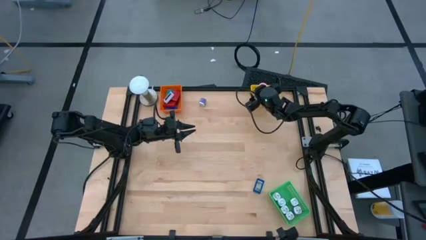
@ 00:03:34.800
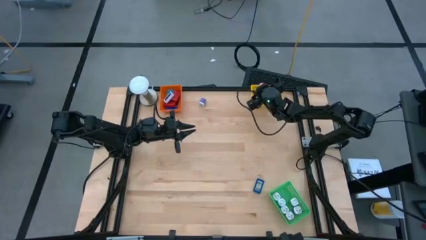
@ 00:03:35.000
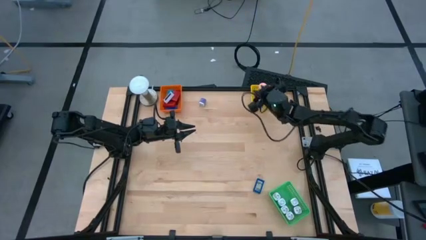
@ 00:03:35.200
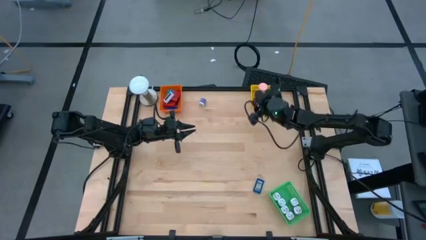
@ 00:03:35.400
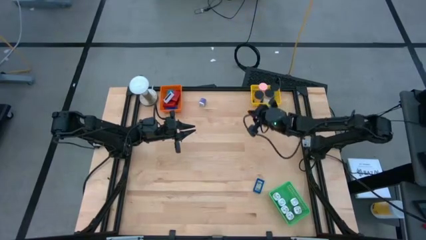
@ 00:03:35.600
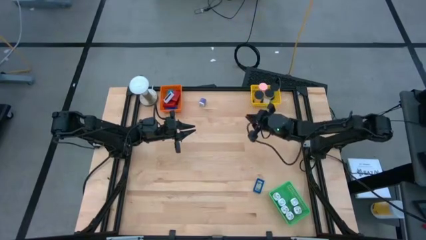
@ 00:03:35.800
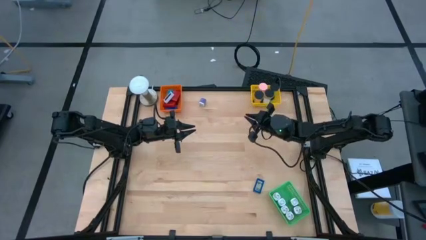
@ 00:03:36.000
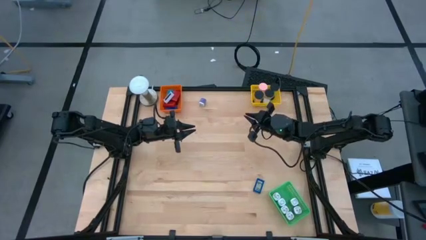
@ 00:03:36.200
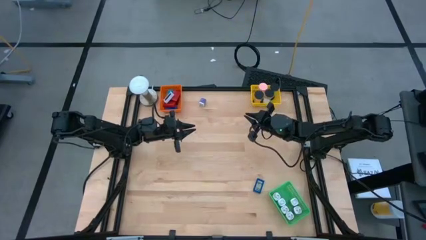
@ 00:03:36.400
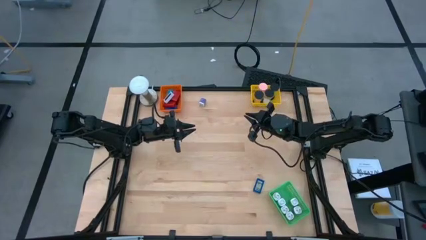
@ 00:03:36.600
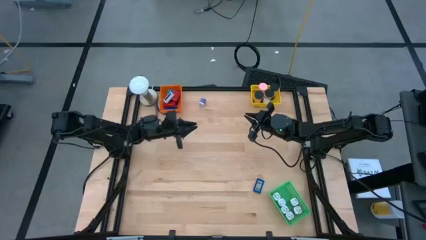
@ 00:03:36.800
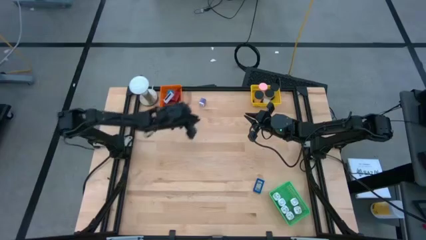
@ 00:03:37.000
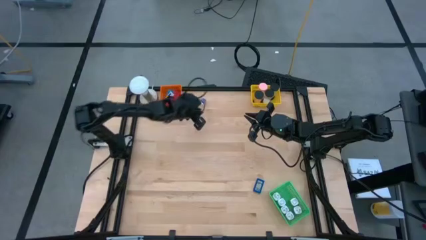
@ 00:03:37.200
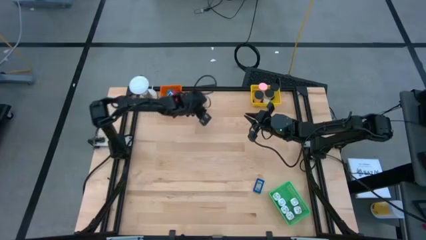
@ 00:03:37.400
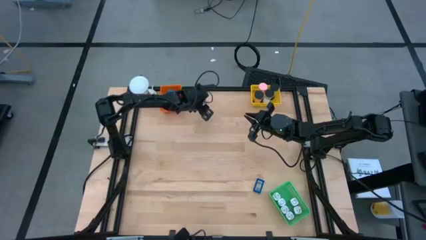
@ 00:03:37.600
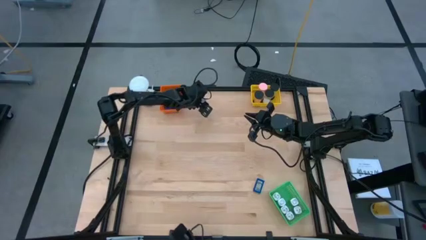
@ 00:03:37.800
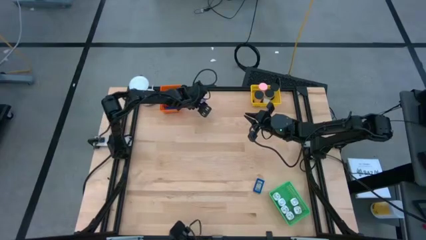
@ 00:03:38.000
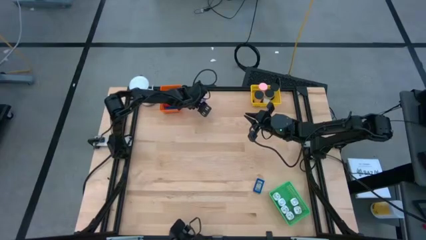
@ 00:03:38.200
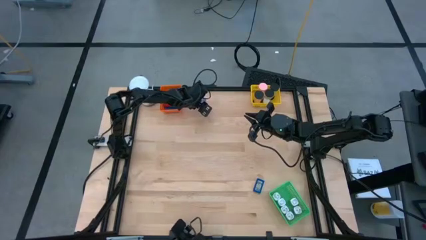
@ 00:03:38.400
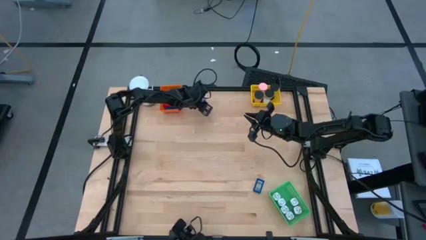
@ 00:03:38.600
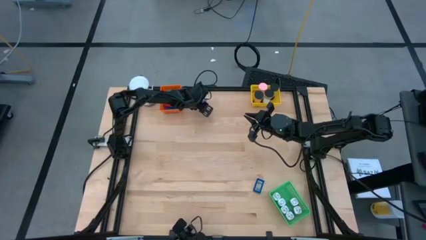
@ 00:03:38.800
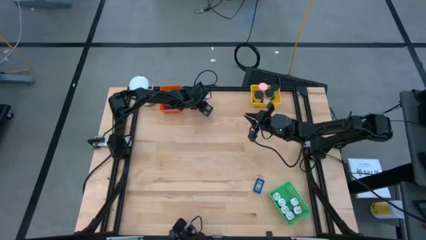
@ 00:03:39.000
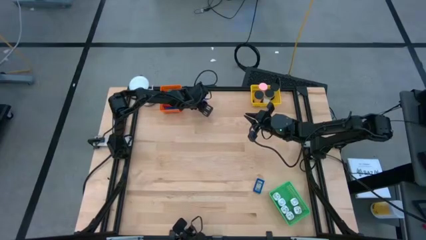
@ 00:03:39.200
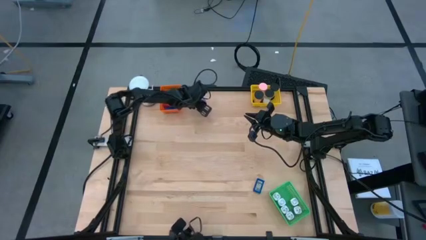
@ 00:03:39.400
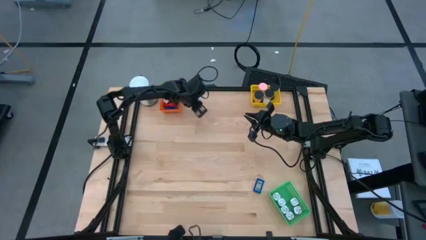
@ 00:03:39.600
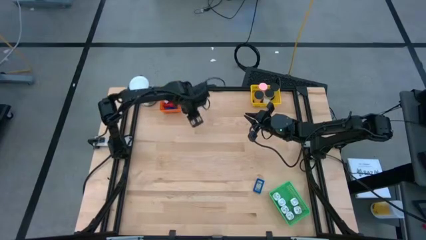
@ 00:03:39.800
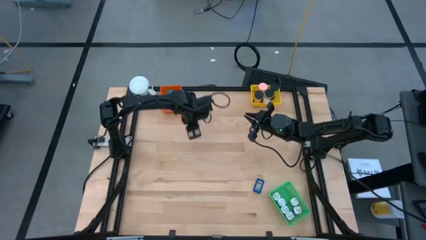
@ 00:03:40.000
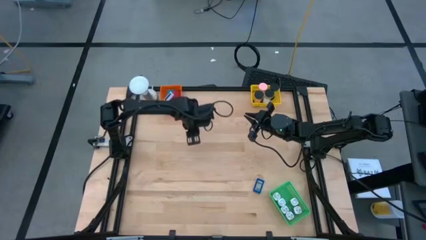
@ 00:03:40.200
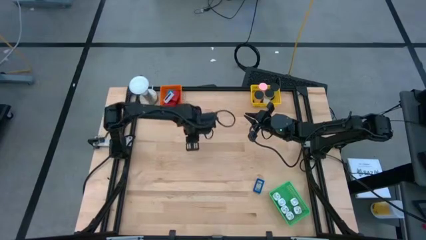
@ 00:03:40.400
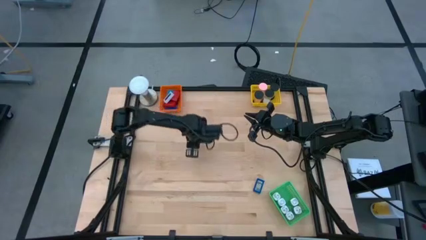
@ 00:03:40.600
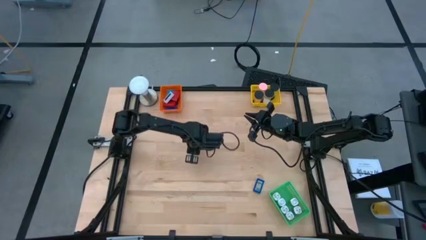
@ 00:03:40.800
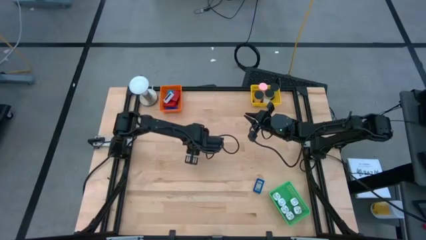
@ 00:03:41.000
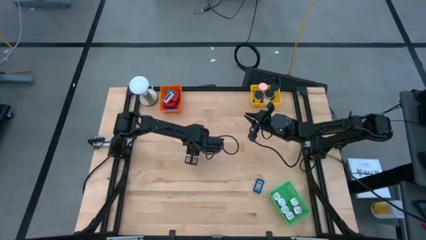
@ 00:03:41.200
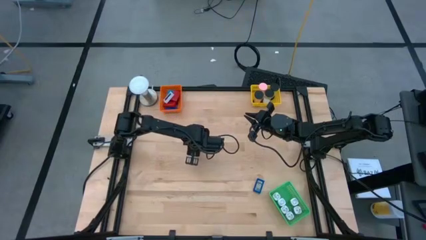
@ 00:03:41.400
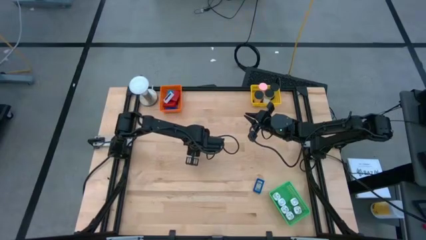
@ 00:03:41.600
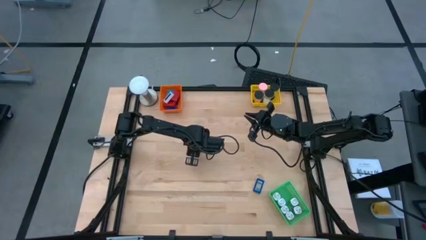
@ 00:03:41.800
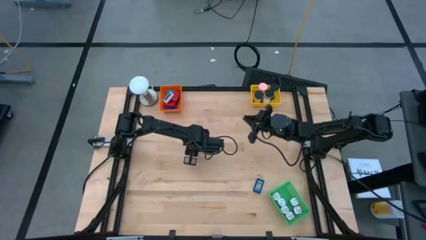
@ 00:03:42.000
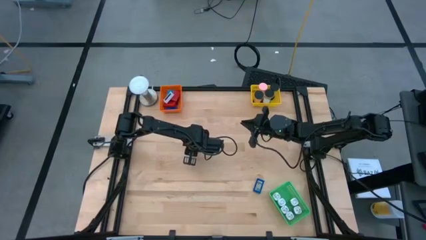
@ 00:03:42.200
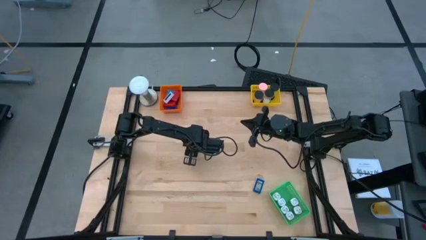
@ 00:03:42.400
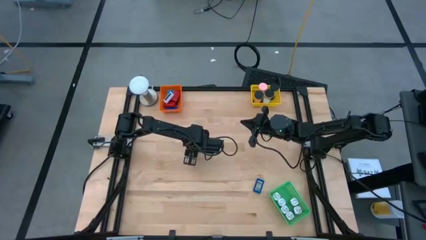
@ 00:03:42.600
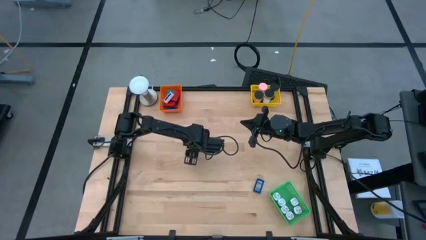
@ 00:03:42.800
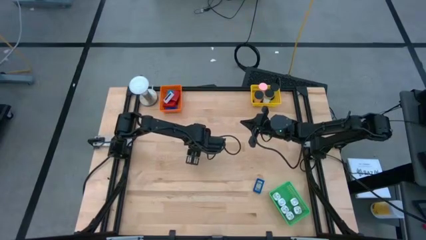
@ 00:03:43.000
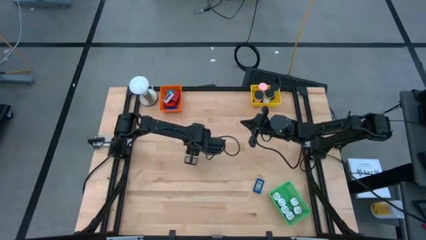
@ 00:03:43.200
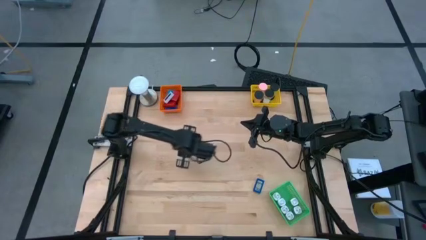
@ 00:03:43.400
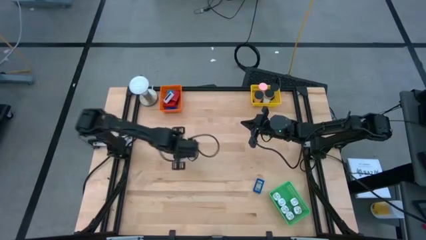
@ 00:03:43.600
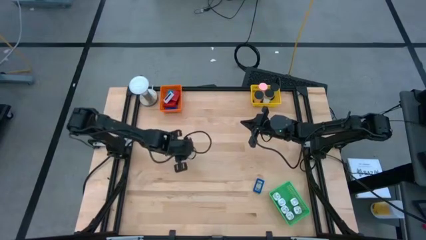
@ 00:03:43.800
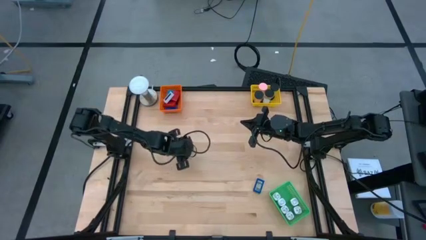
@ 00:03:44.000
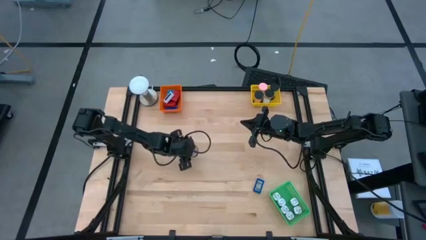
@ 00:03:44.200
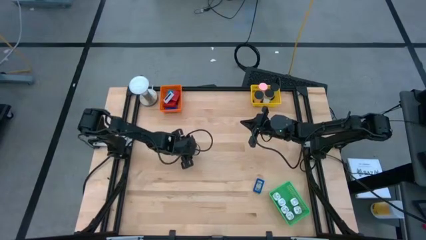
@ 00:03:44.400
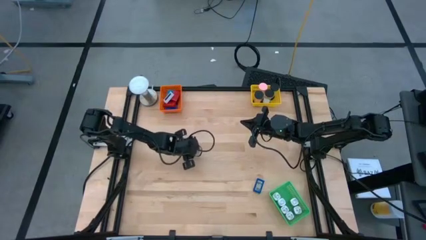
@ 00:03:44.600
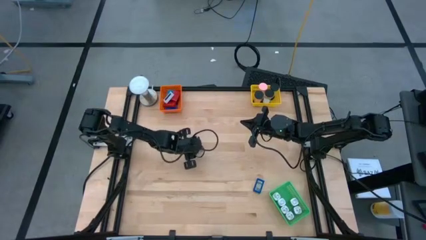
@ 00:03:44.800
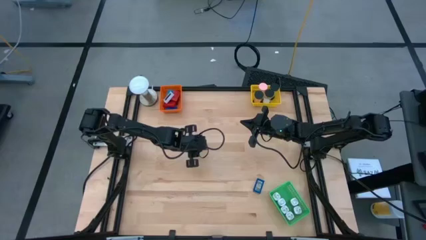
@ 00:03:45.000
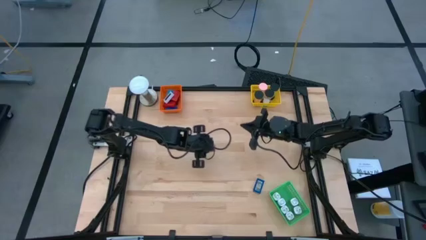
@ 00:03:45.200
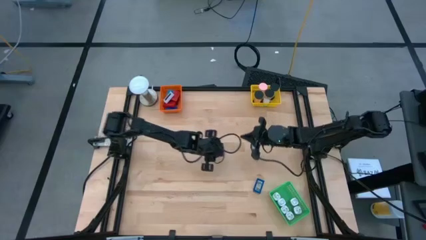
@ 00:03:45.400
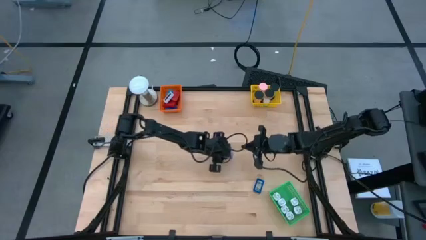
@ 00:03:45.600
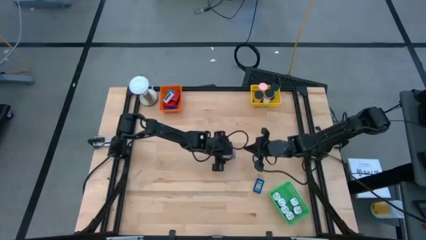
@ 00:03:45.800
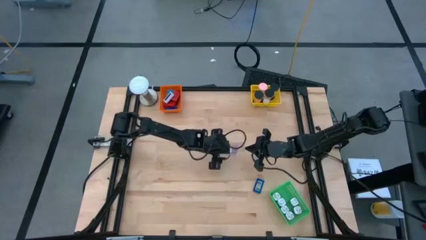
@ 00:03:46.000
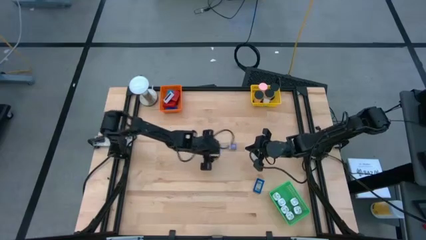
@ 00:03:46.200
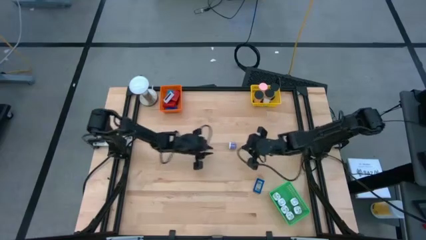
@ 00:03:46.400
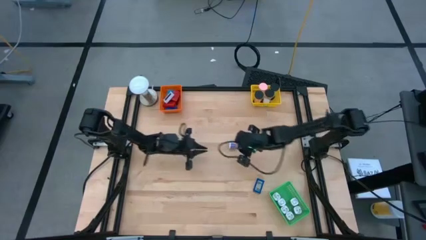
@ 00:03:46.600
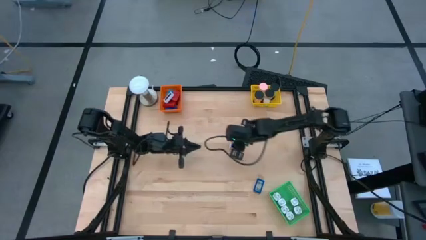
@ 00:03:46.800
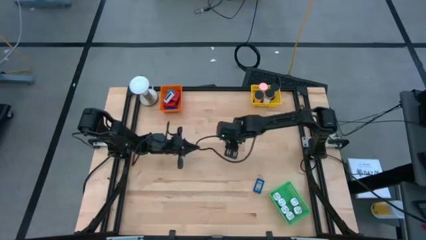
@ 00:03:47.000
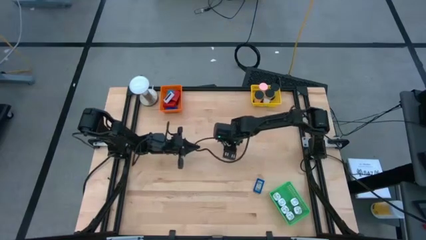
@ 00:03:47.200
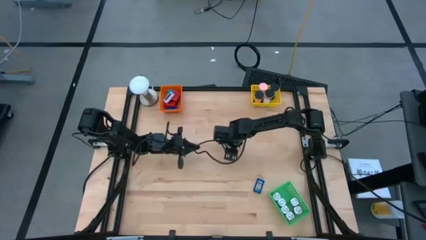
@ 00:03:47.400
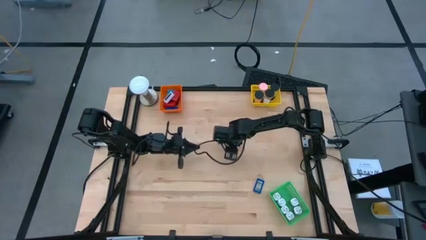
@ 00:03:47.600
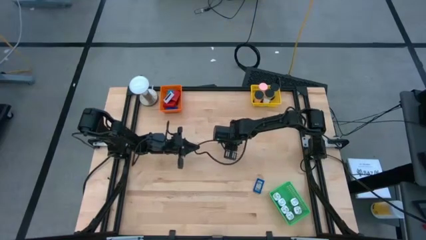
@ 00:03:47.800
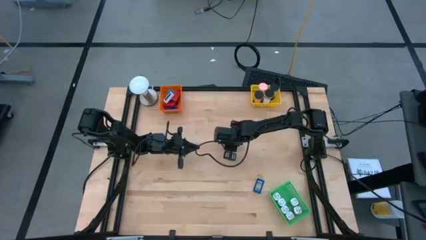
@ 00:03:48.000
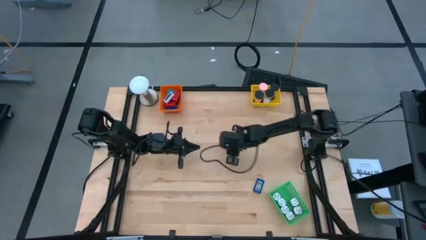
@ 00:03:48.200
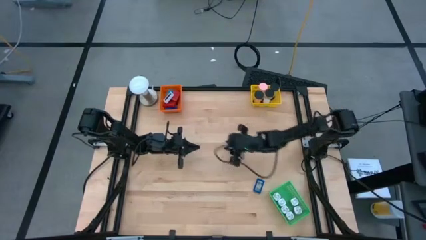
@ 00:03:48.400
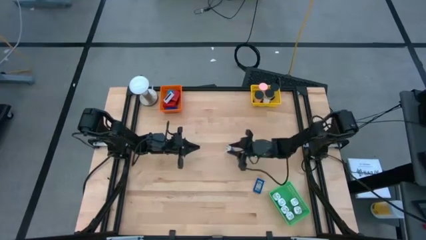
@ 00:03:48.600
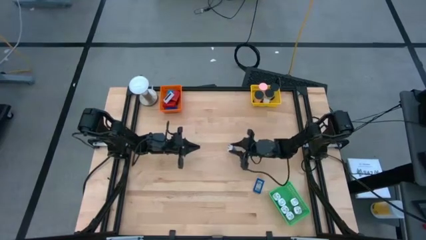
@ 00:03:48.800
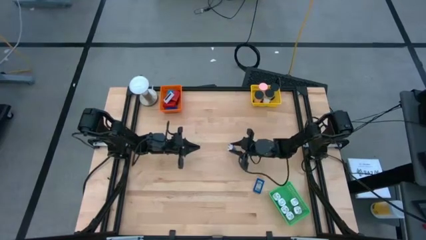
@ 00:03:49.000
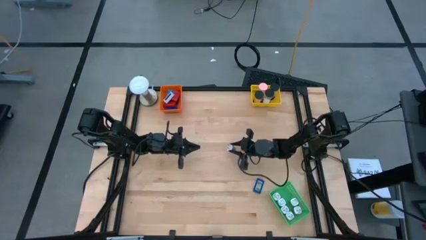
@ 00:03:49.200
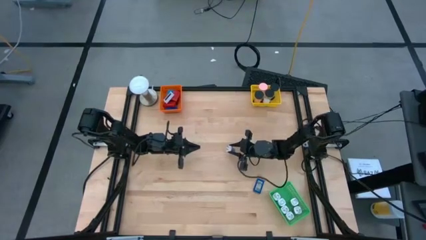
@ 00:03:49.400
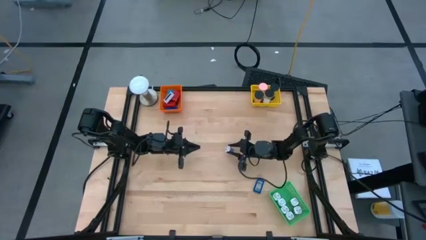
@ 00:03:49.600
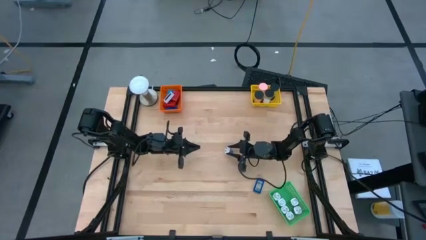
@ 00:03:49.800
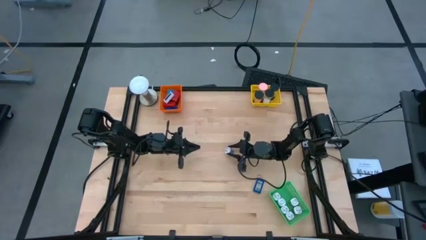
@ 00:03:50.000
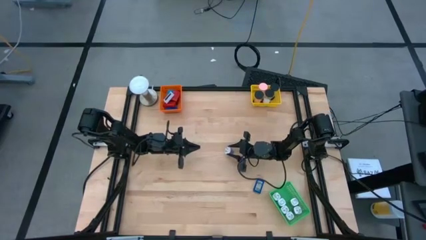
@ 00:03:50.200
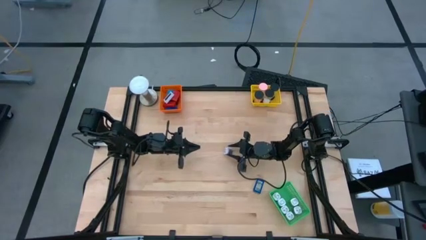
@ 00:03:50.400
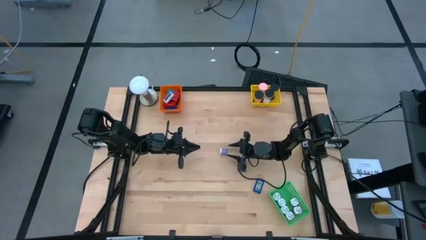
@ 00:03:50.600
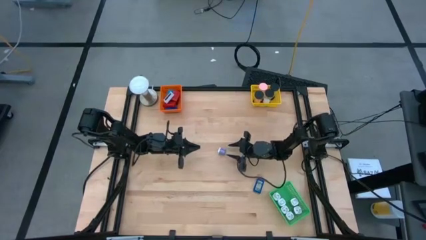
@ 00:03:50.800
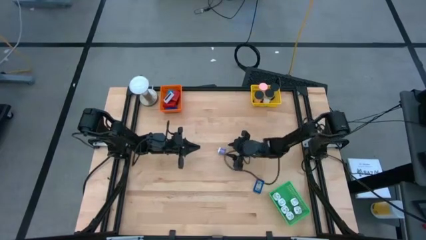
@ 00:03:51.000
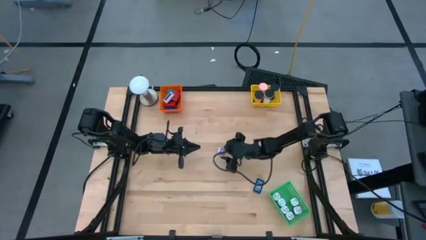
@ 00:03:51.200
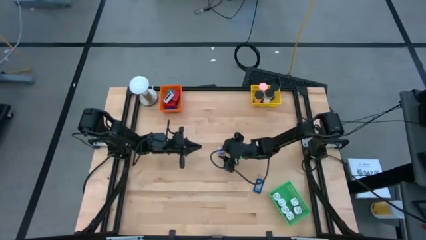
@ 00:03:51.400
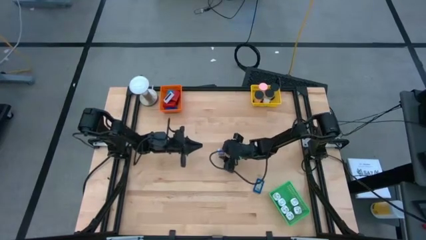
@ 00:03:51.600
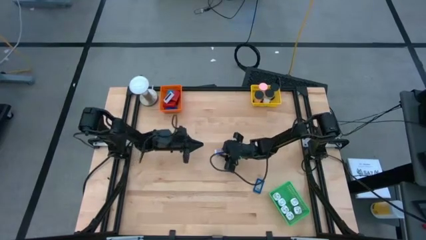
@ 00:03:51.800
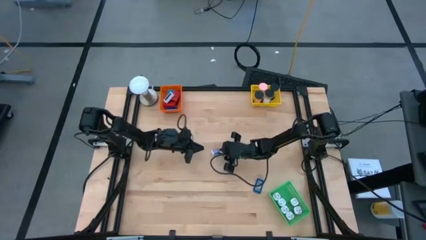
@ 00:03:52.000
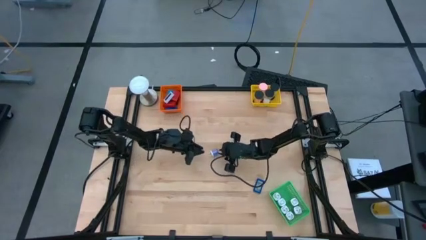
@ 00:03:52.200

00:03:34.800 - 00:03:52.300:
Task: Pick & Place Office items
Put the violet charger adapter into the green bin
